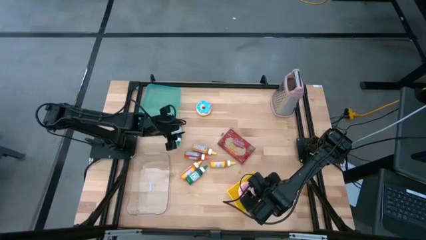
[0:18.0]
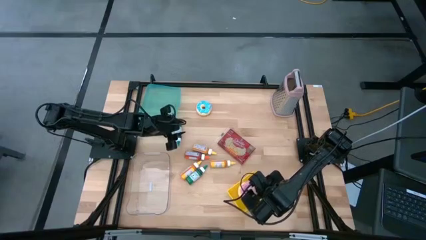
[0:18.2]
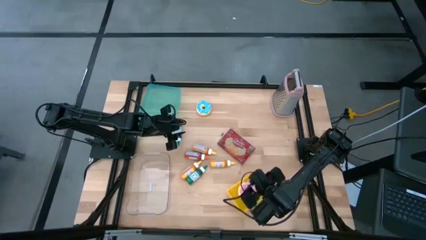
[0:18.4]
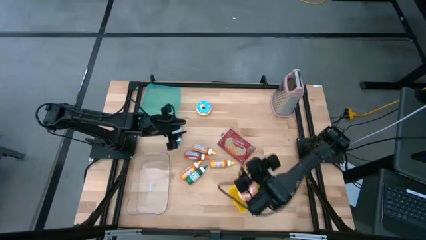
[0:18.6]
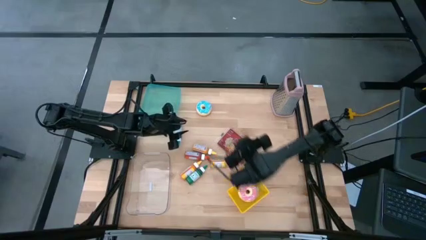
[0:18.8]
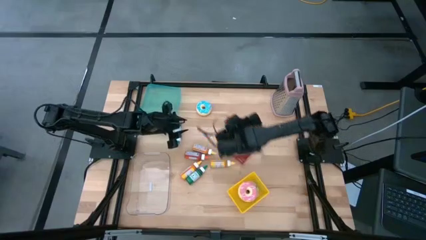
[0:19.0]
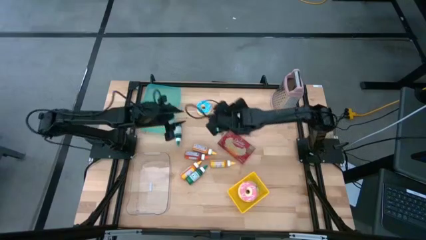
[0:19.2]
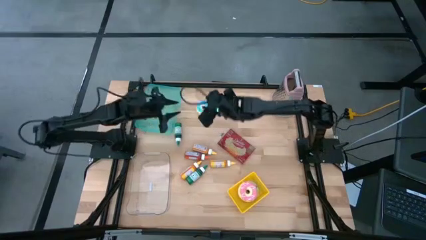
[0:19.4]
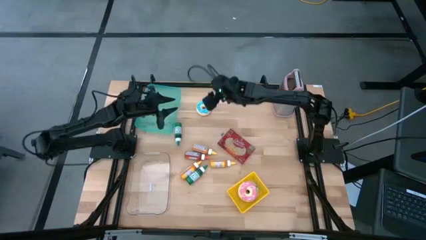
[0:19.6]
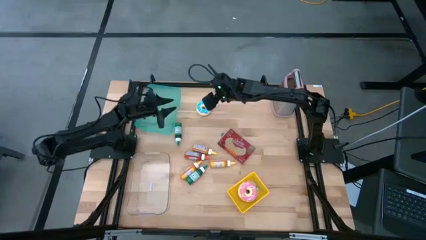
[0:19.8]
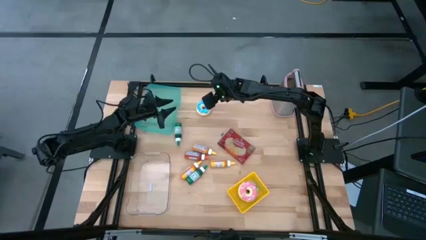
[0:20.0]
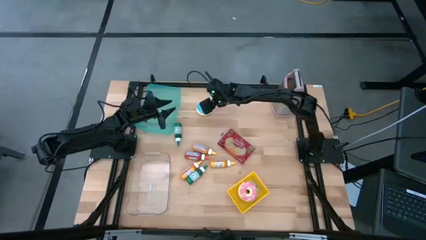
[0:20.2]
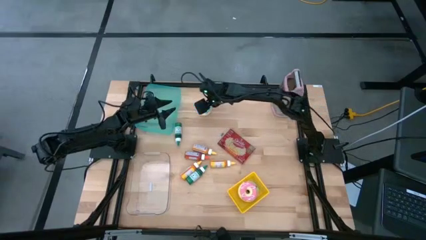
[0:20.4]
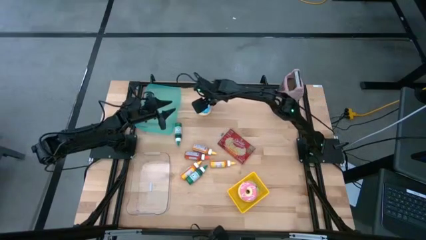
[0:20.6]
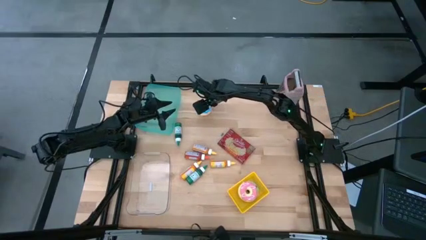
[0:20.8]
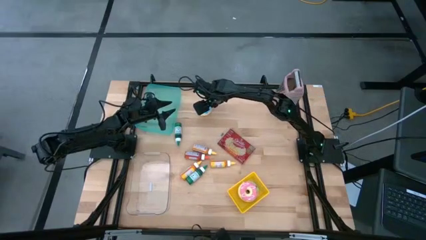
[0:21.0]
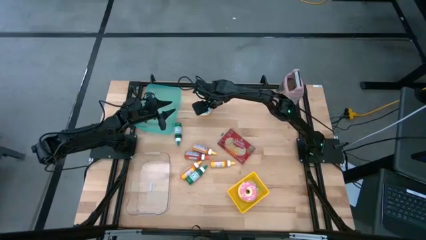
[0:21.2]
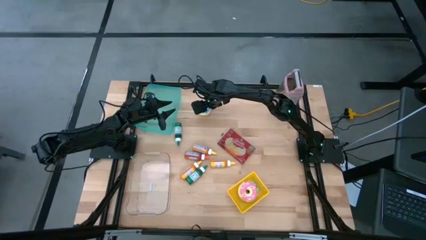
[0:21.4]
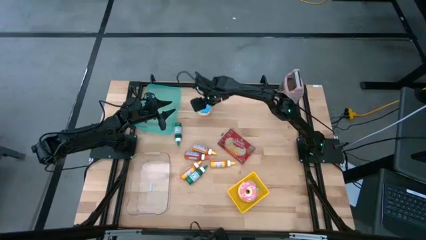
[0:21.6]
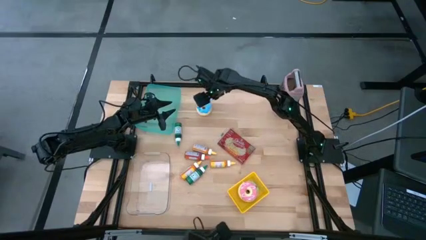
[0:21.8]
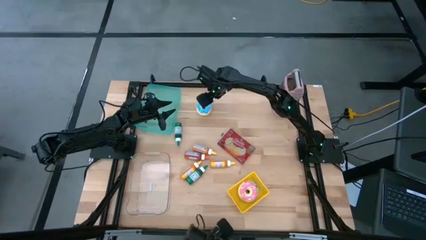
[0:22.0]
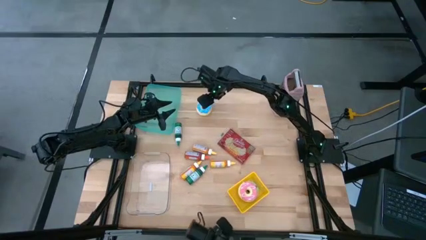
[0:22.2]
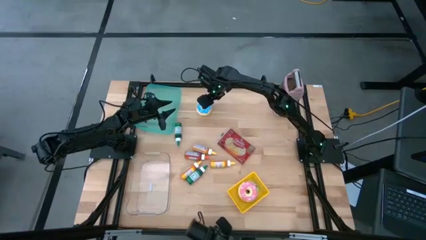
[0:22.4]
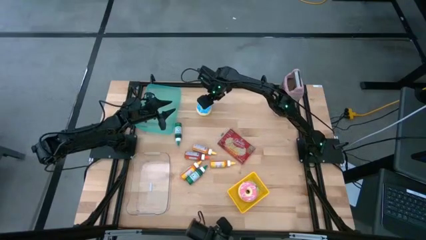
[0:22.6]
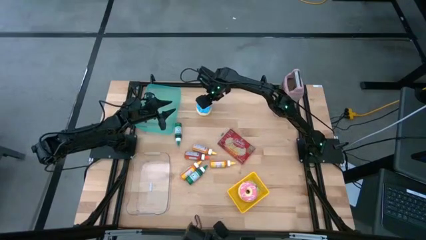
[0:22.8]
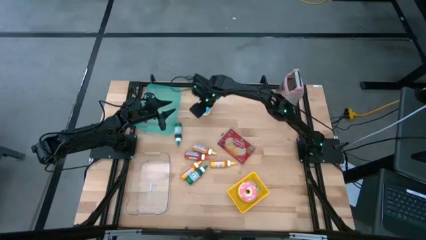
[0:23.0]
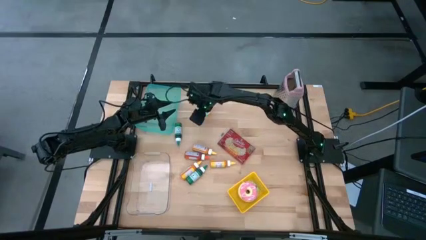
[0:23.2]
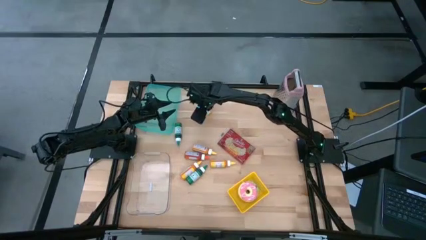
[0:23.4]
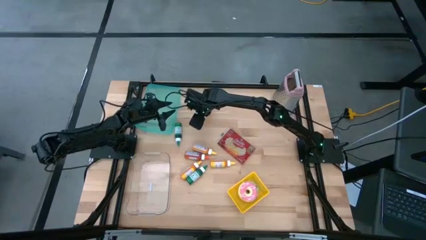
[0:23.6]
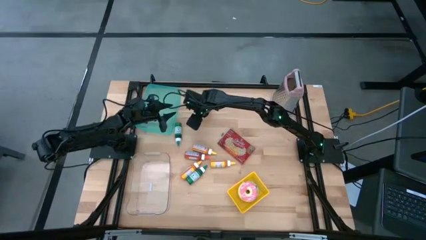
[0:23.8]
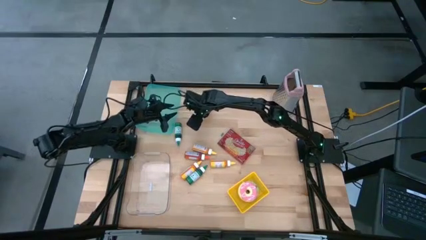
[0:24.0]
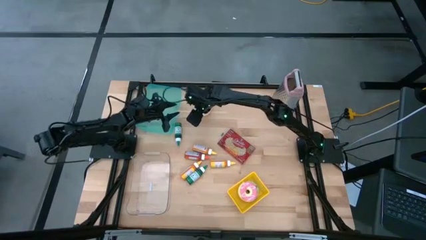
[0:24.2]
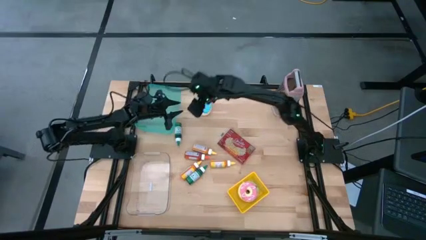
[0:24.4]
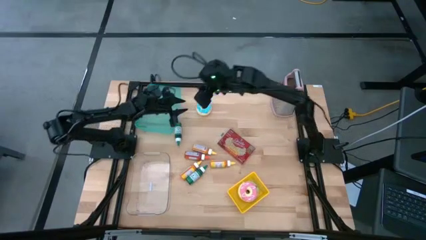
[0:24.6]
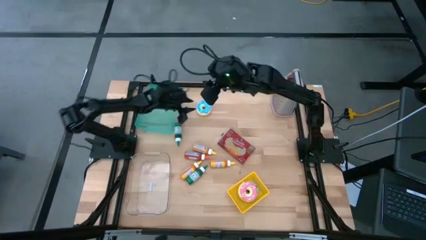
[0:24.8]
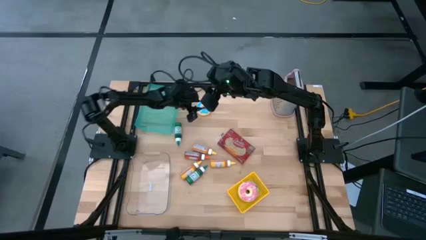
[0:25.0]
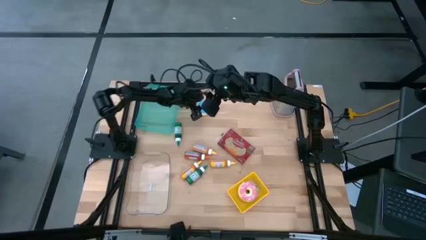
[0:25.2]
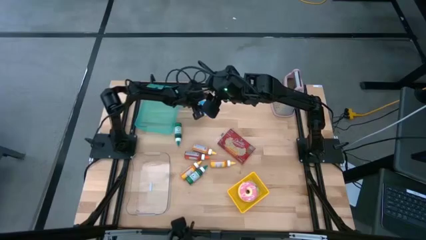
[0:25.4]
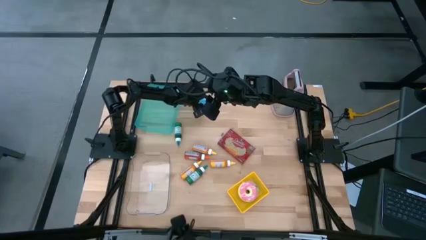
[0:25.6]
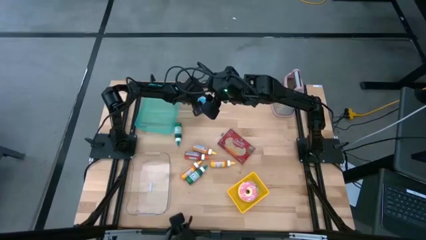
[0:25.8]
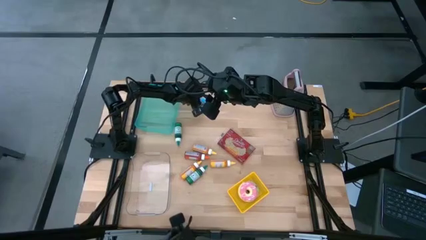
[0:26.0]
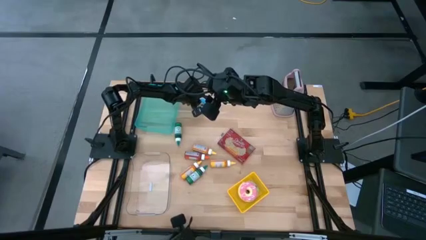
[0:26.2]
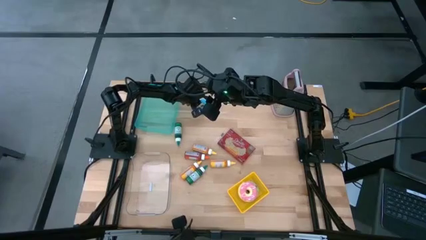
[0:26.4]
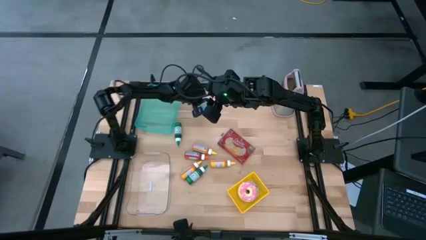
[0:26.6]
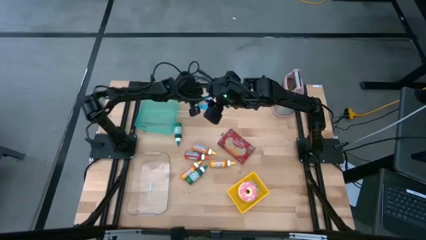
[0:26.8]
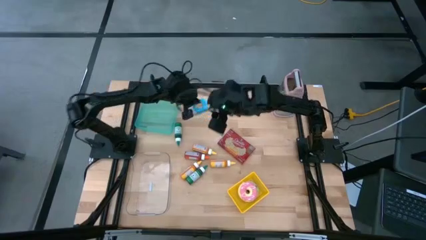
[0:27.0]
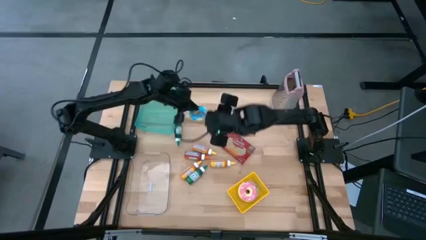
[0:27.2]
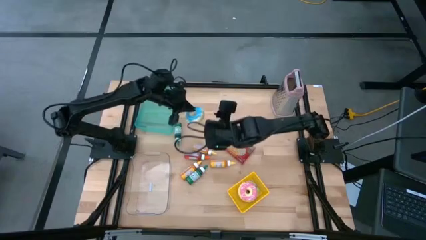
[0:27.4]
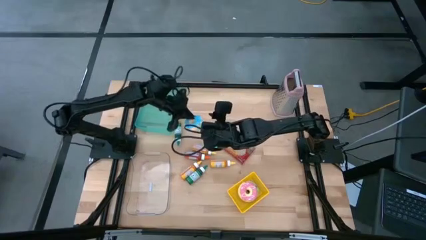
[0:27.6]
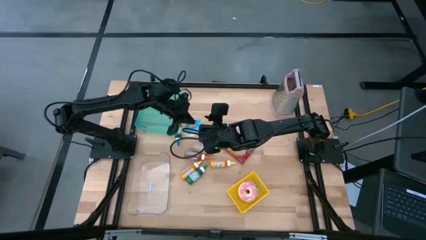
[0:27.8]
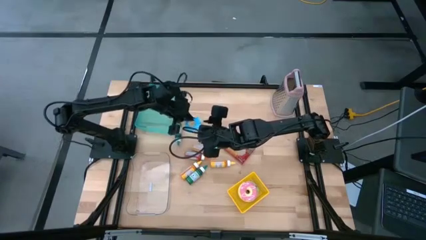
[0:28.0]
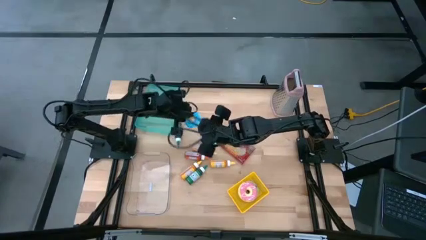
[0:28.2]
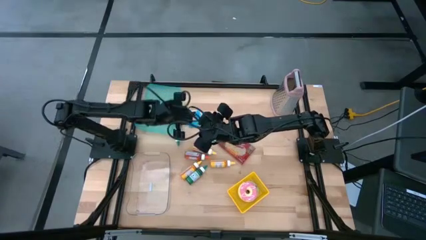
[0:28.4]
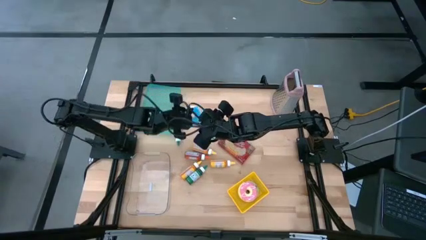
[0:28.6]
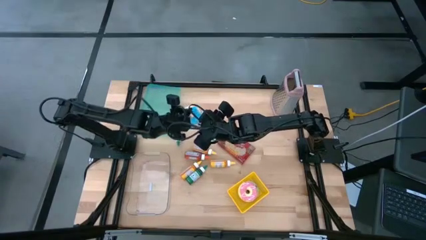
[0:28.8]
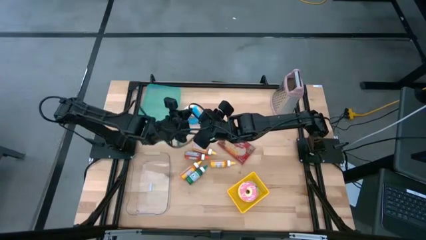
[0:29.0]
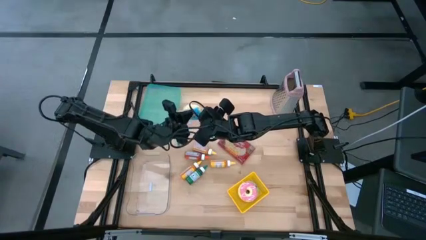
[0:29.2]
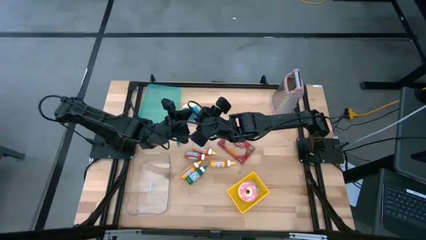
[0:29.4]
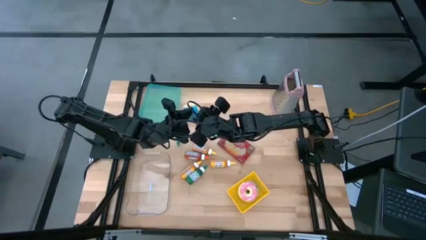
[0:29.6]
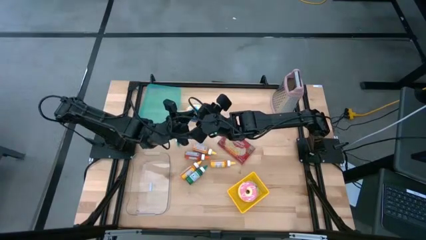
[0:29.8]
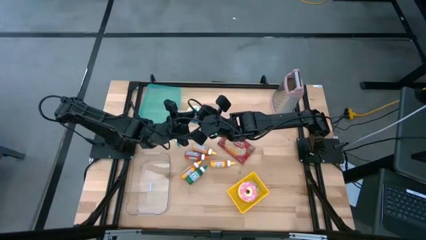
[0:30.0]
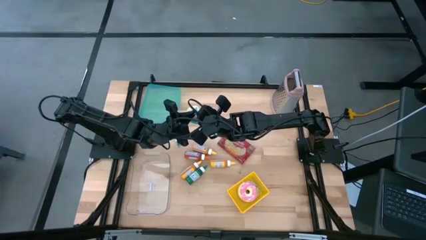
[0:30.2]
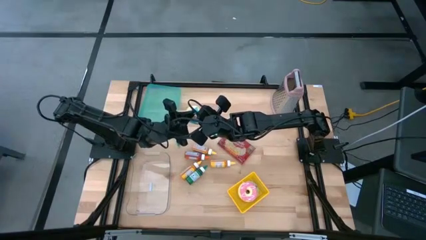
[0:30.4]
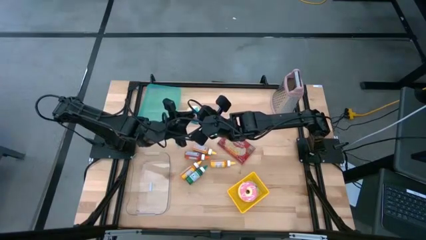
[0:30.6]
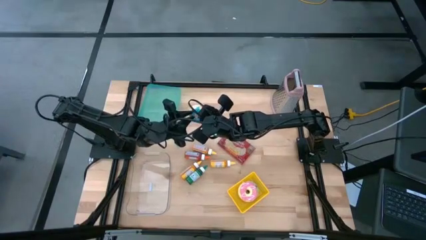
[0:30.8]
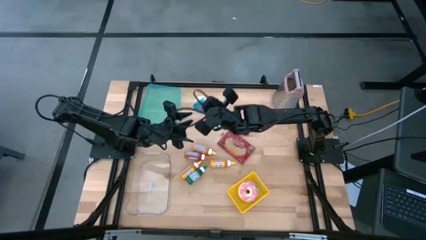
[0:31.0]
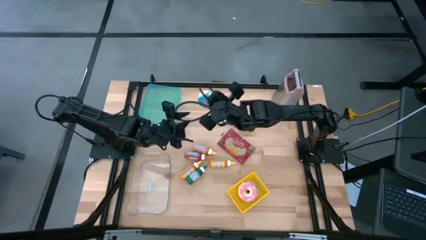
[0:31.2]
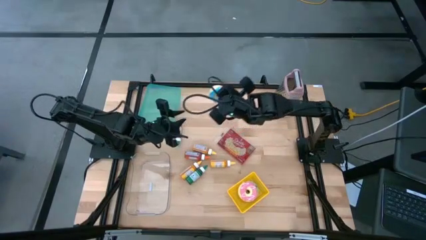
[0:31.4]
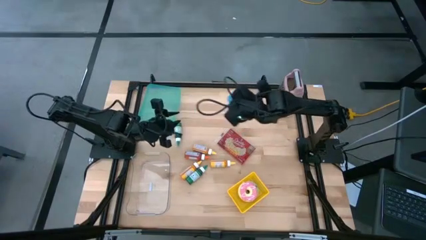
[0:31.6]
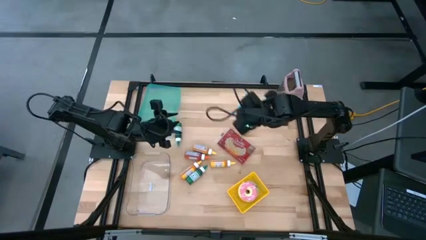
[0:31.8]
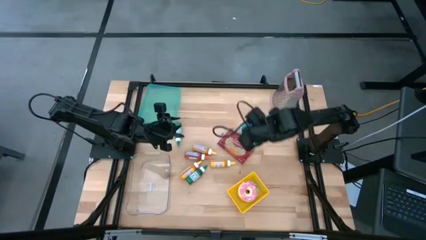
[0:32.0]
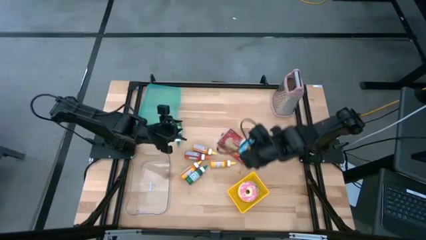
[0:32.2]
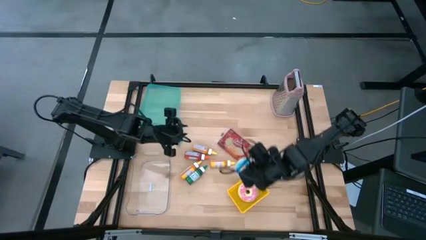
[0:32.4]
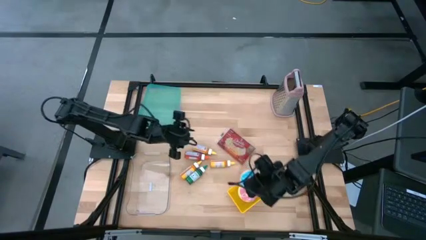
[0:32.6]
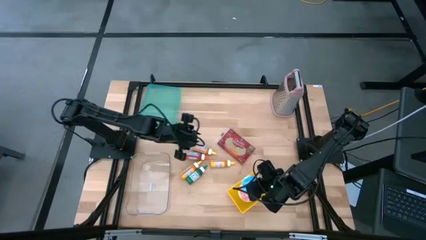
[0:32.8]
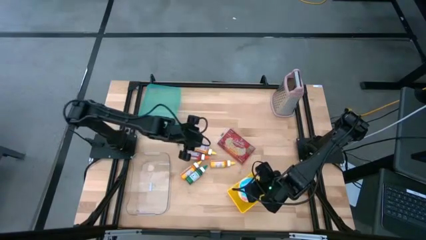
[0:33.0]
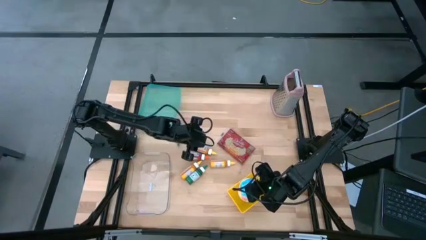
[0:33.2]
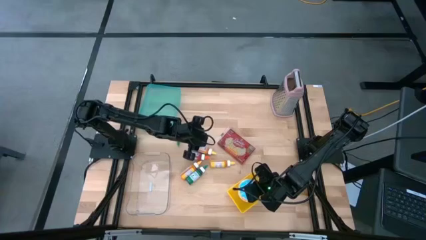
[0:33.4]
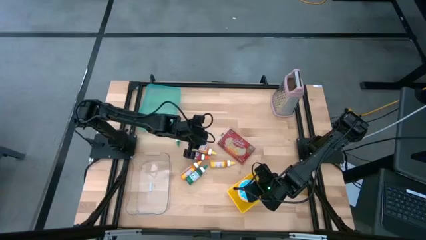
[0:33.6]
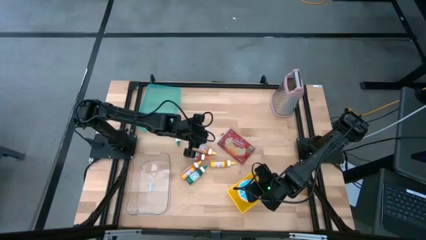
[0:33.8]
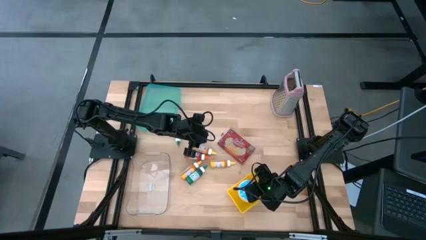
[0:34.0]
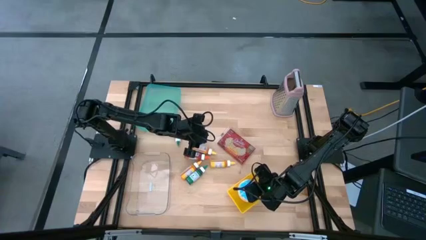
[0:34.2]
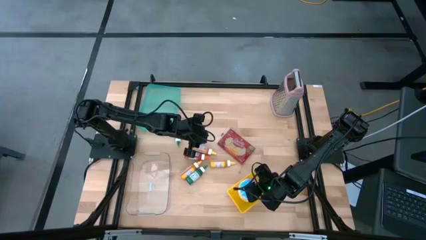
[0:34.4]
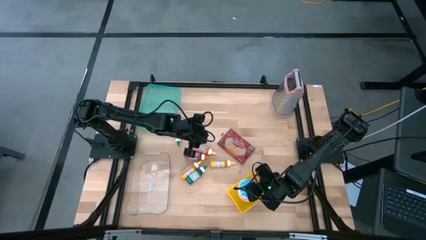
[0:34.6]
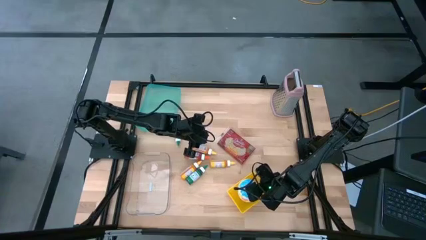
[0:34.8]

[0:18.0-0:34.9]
Put the blue donut into the yellow bin
